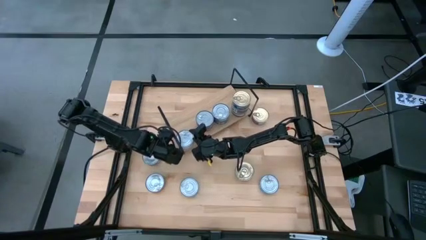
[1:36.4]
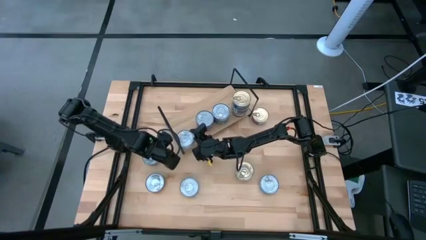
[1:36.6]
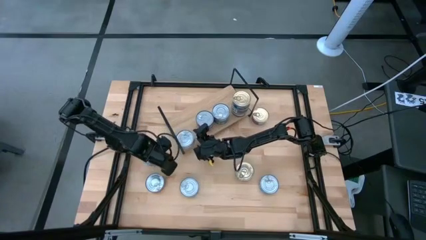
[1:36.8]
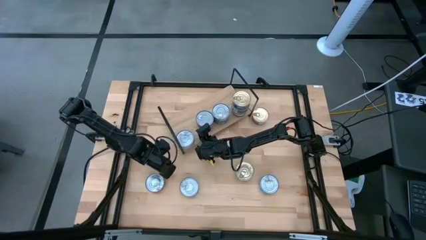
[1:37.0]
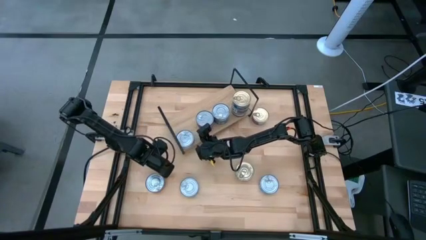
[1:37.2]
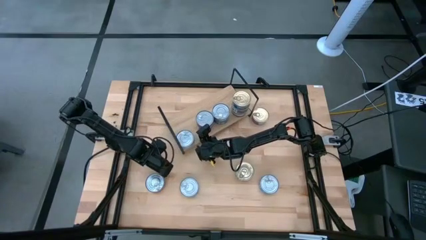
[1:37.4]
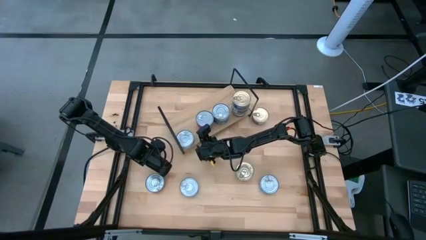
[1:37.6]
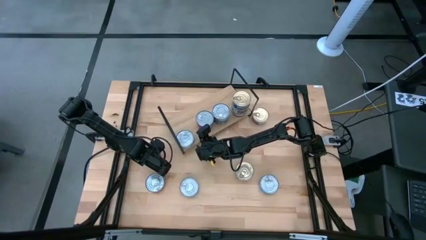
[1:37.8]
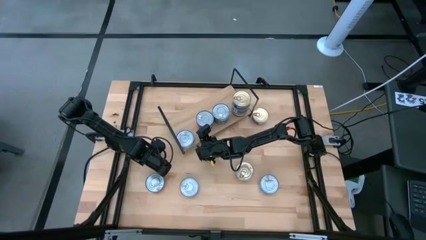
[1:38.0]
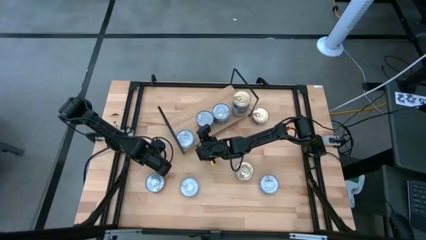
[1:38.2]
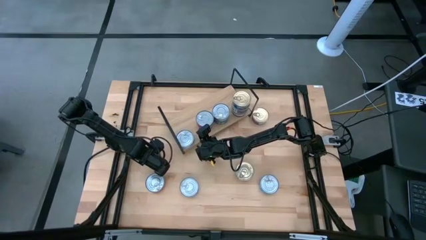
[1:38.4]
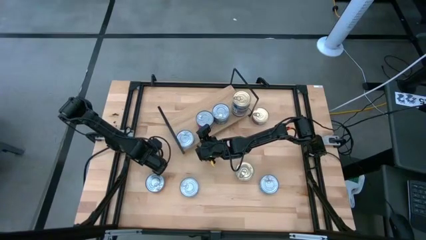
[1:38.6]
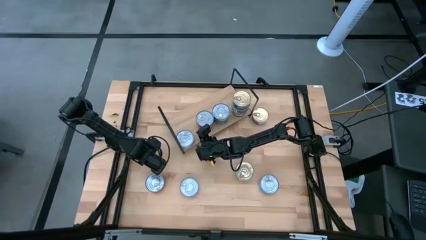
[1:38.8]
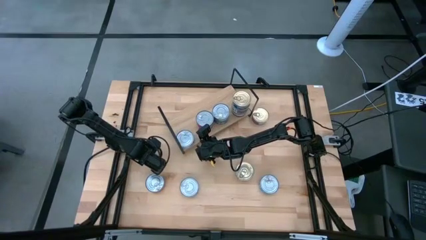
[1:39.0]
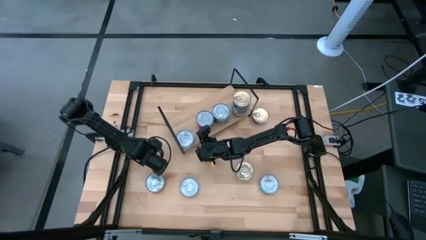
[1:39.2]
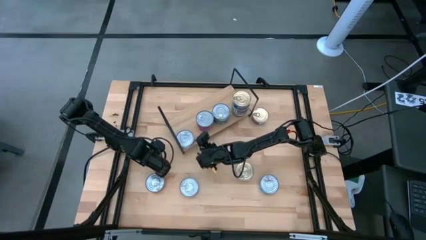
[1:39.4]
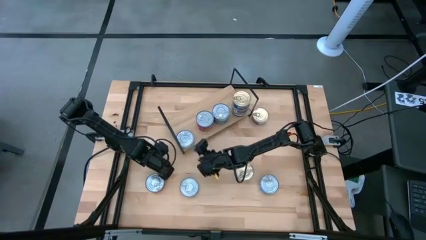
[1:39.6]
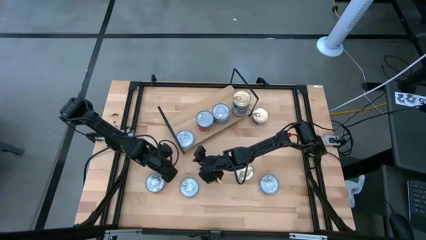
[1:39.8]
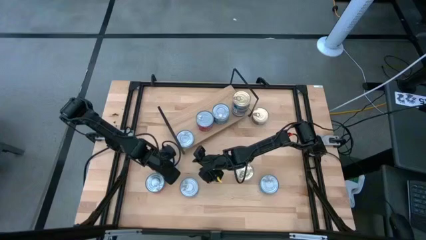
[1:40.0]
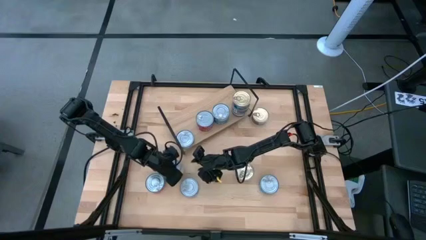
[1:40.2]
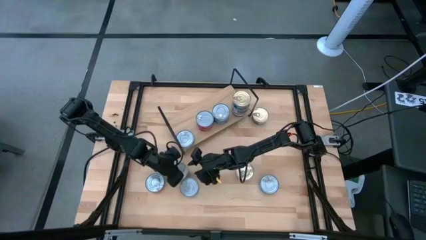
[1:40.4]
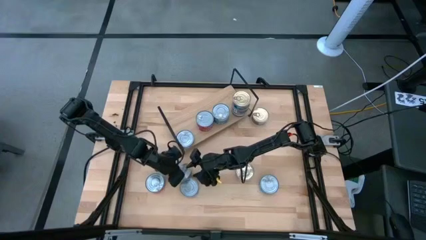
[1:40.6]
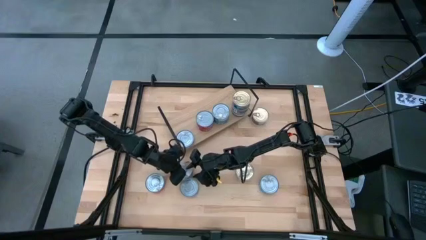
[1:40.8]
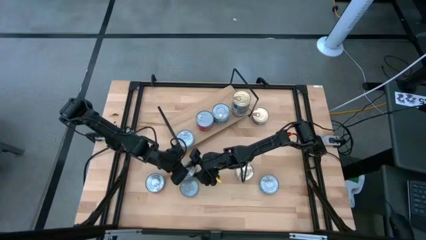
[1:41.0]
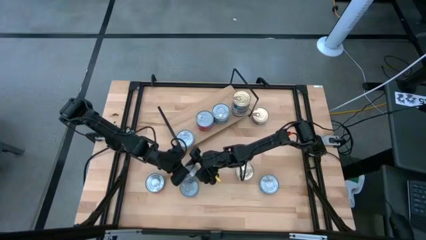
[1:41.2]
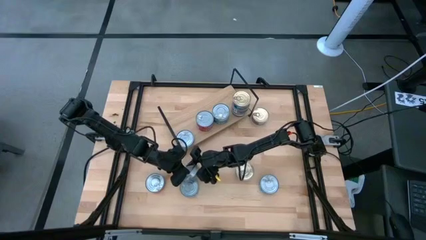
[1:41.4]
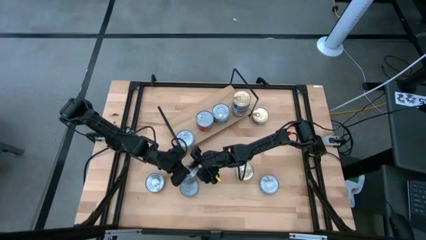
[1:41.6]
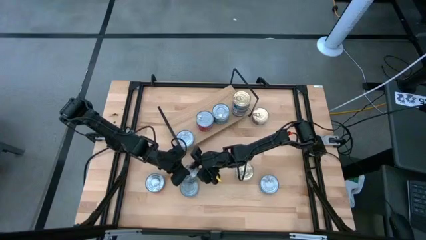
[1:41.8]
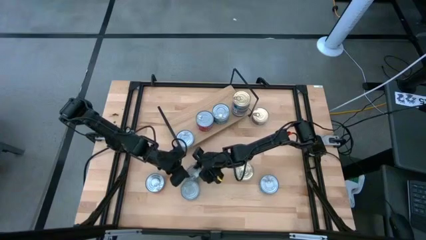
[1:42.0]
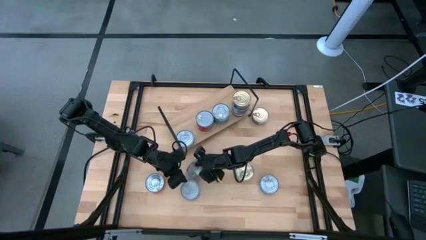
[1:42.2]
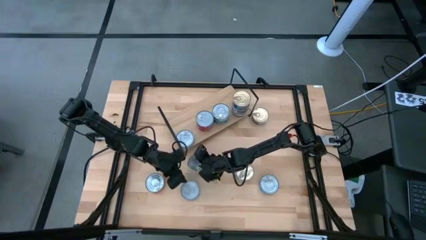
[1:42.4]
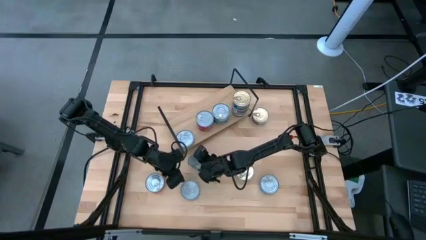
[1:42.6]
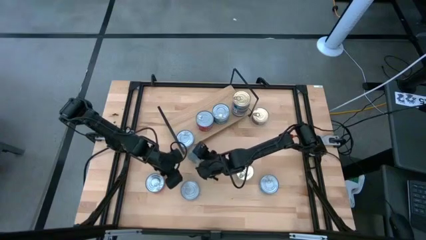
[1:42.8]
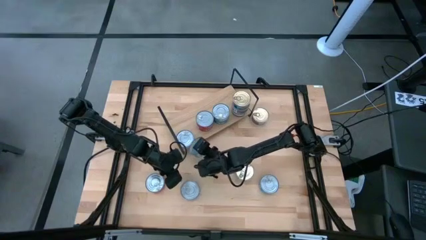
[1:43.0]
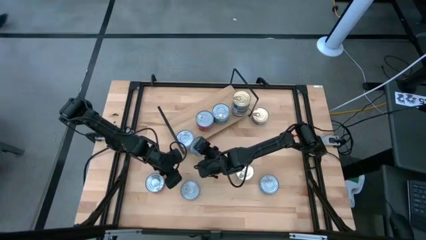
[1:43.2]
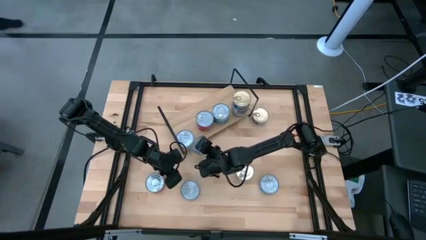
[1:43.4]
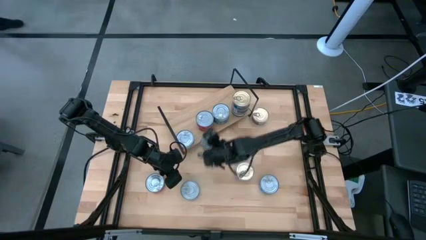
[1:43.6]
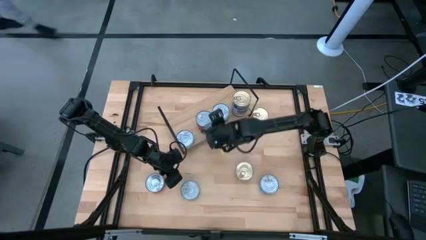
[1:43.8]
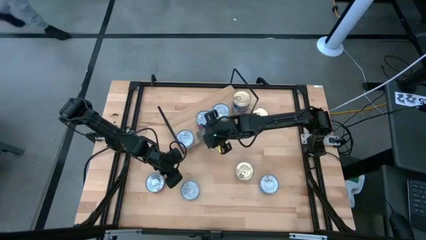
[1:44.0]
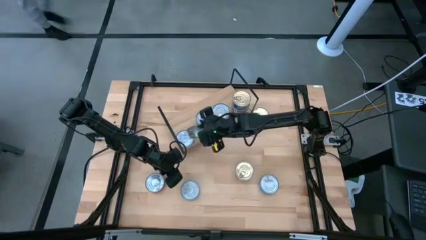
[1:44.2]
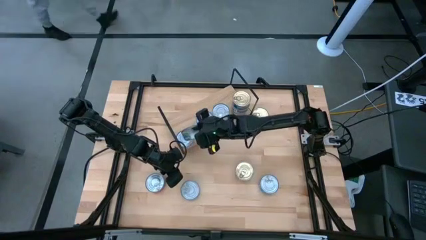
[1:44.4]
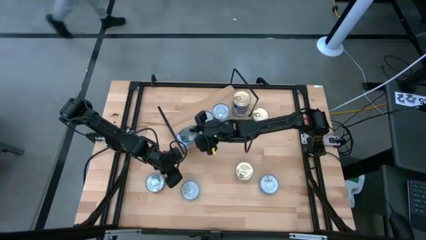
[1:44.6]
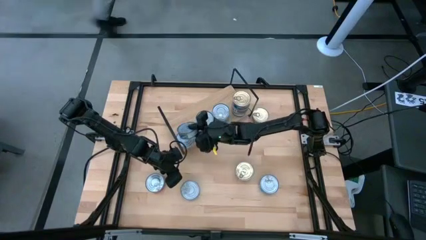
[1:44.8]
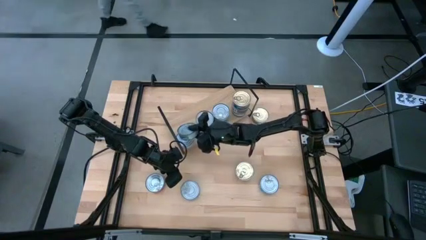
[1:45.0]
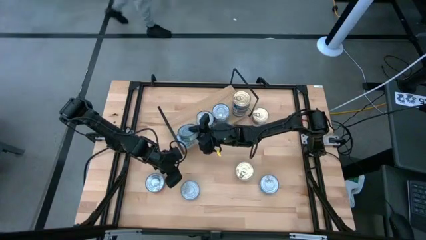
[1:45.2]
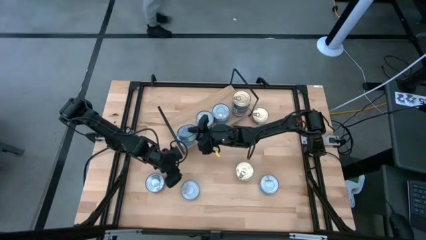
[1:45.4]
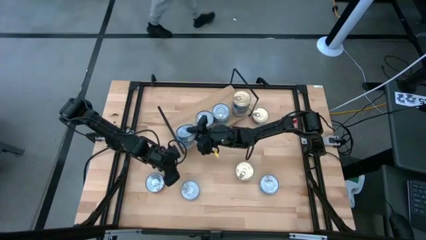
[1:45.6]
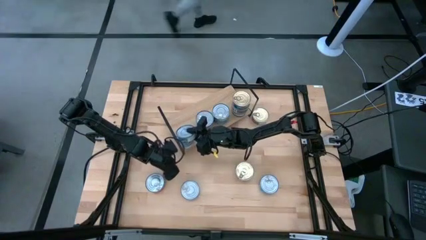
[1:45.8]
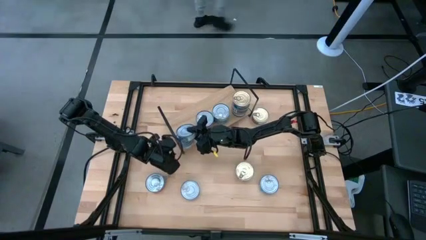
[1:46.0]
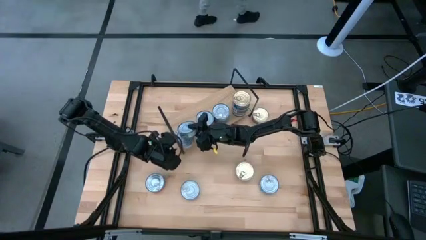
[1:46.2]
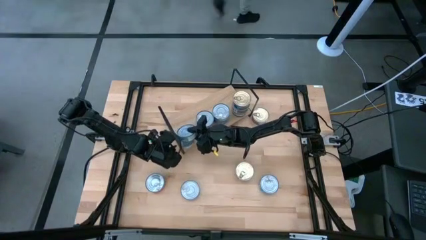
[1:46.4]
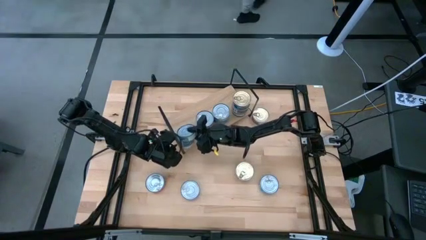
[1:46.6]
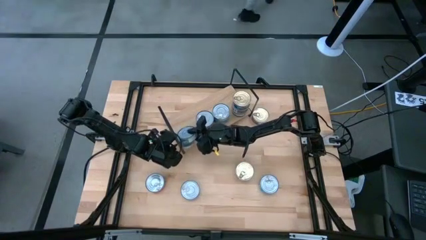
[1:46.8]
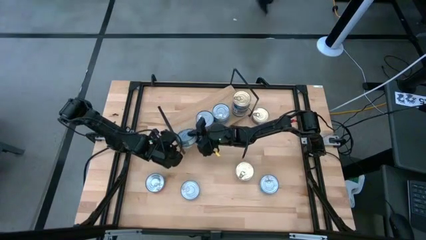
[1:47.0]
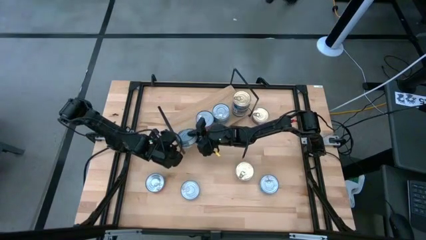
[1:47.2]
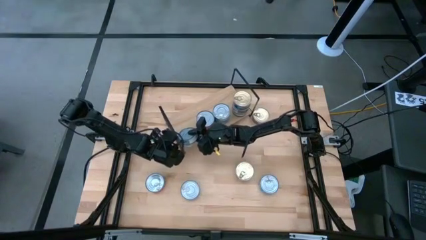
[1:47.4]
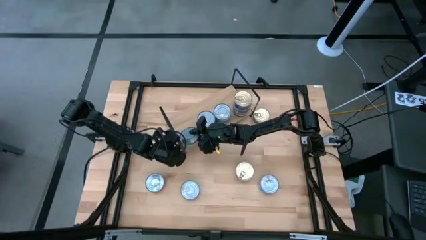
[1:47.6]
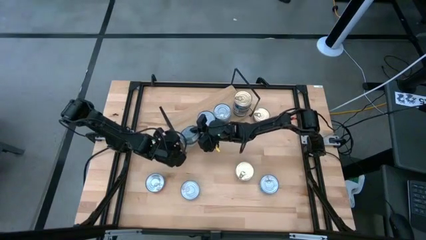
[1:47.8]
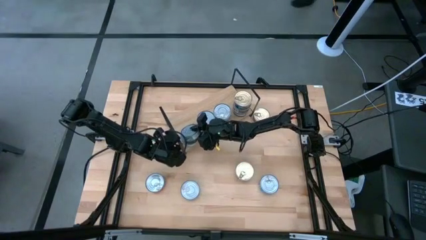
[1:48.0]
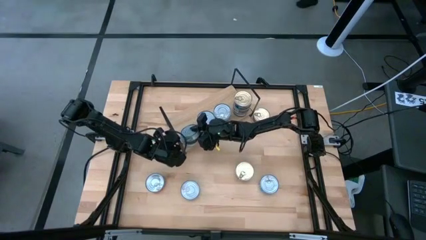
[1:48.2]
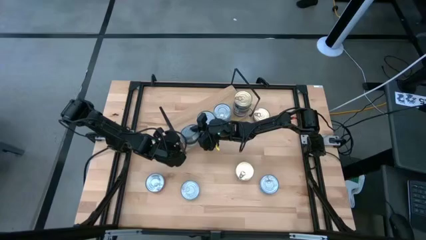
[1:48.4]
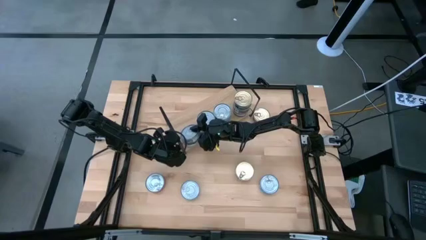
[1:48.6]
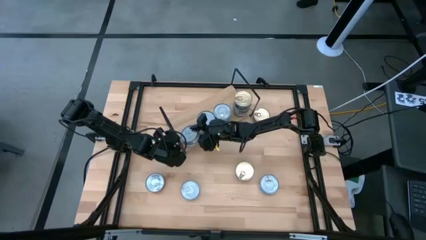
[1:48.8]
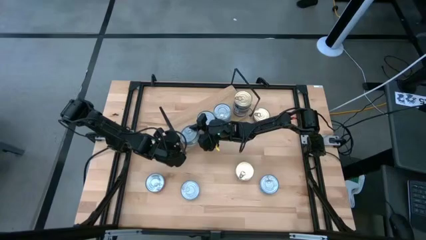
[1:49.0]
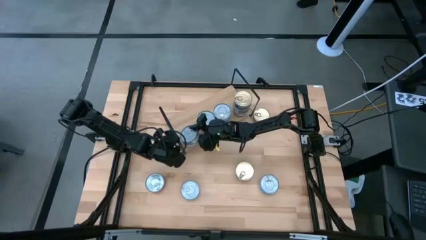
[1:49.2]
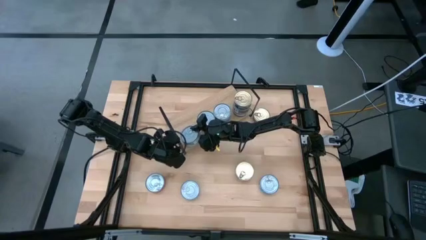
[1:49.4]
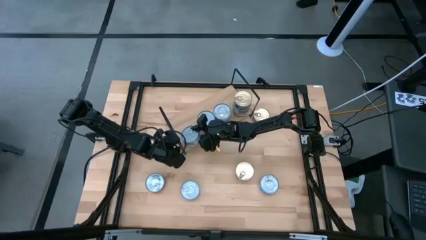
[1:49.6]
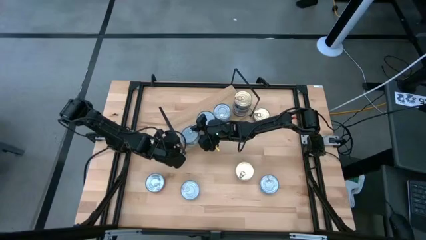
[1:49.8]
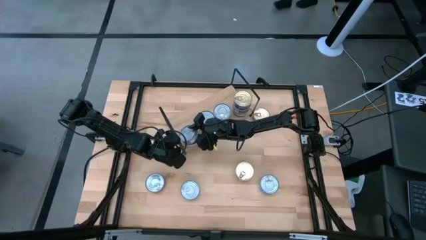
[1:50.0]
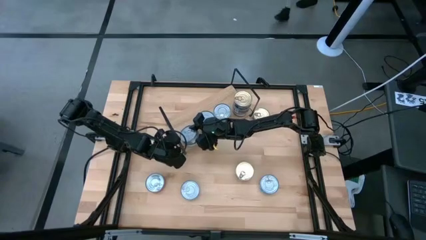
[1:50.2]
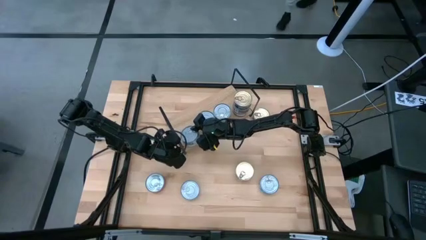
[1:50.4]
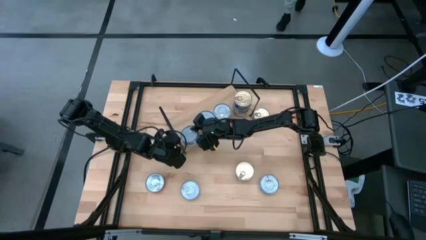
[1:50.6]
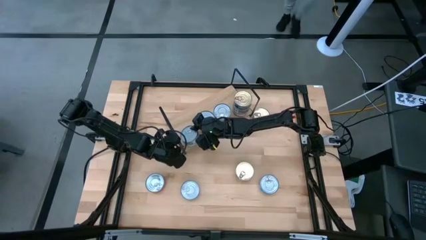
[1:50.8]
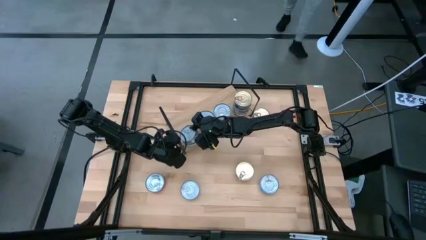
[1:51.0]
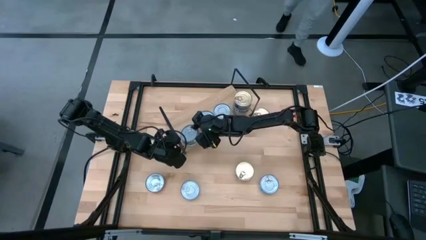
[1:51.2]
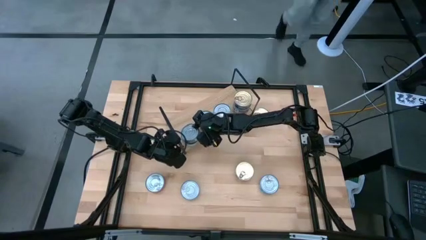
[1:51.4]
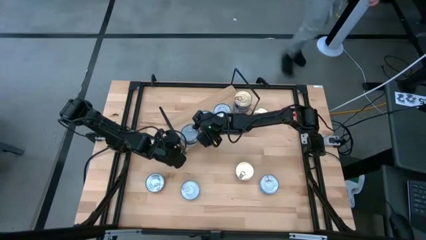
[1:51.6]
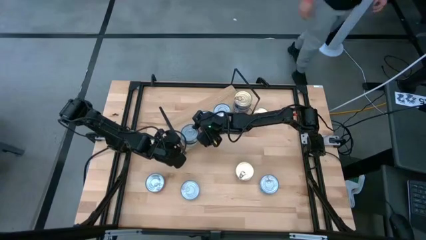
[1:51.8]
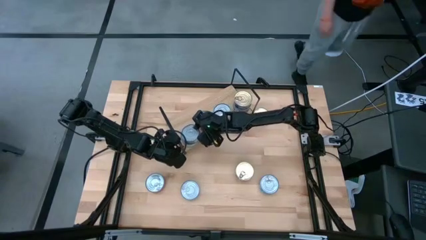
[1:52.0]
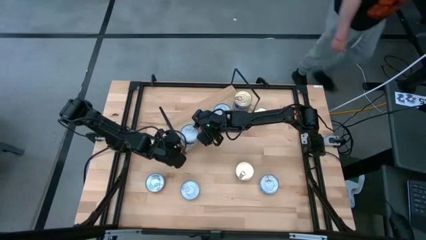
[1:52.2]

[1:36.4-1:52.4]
Task: Stack canned seafood by type on shelf
Stack the green tuna can on top of the green tuna can on the shelf

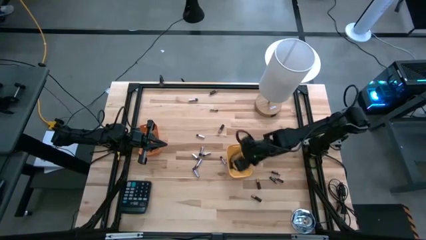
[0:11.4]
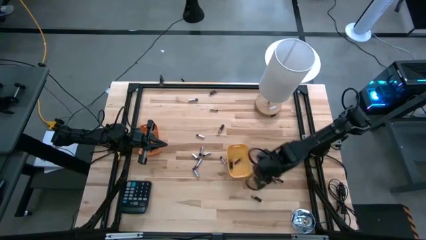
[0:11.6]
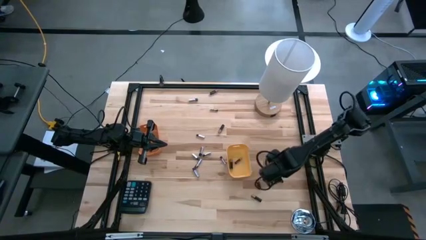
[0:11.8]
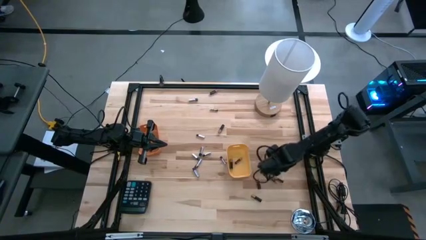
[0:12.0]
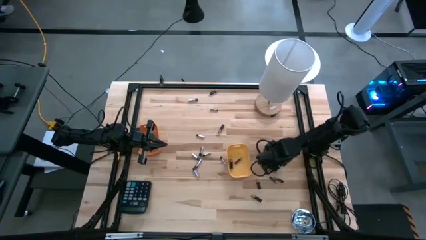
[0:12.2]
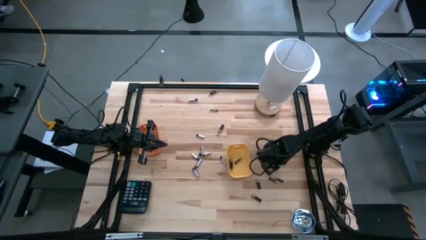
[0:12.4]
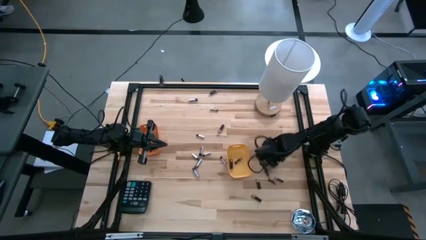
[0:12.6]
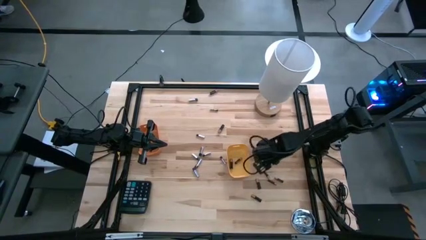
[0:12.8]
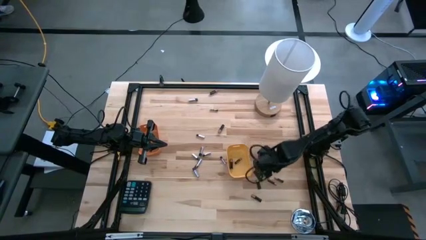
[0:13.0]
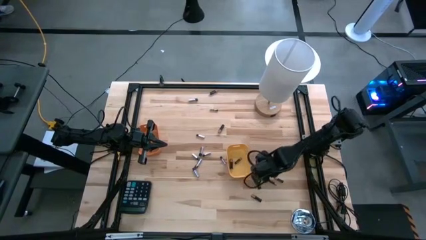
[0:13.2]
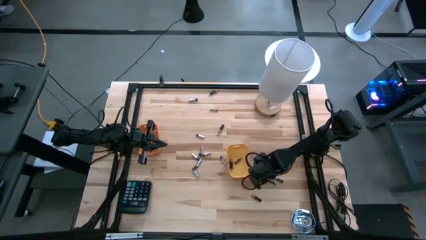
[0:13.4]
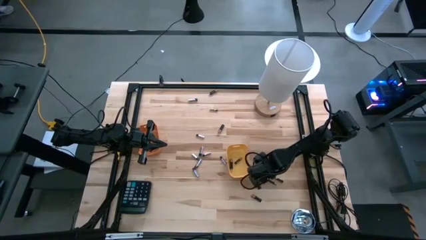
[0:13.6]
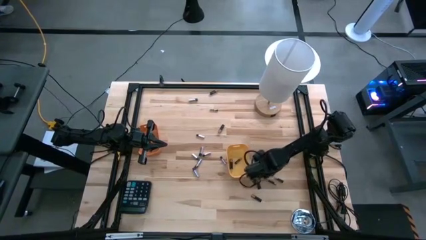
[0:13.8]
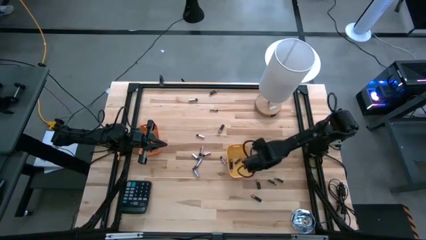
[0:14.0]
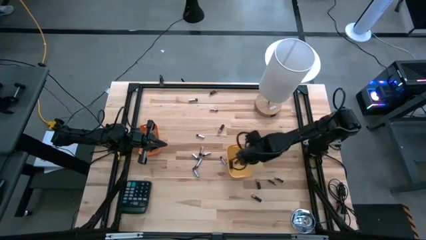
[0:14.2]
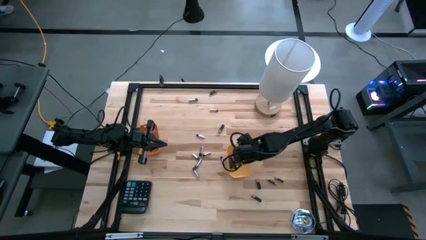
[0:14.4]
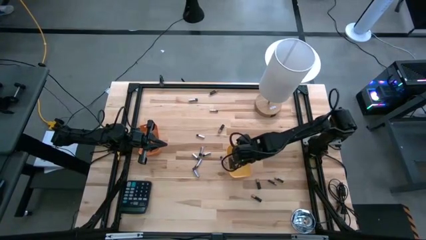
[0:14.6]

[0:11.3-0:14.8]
Task: Sort batteries
Put the black battery into the yellow bin
